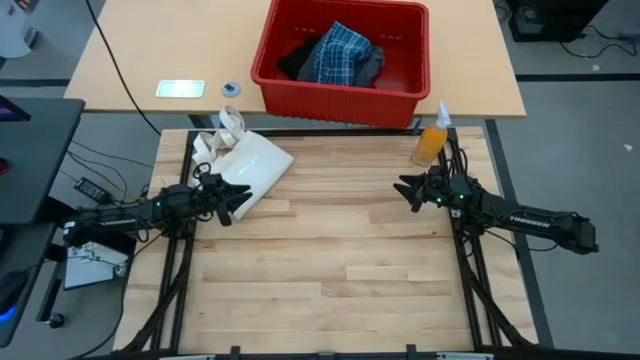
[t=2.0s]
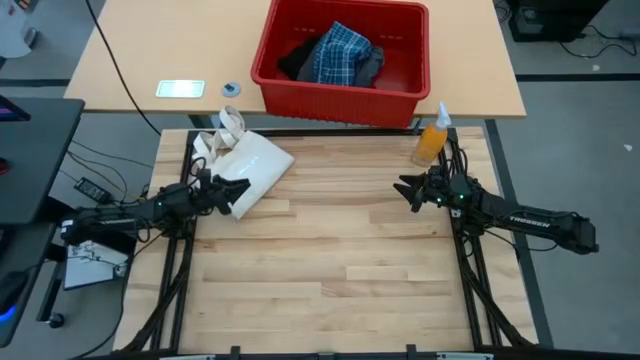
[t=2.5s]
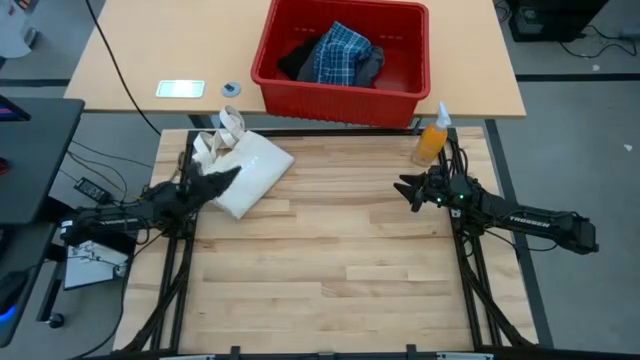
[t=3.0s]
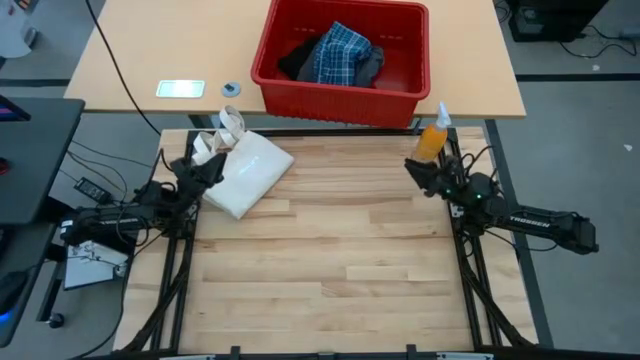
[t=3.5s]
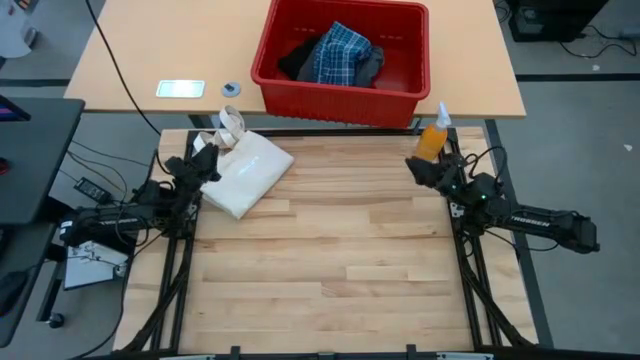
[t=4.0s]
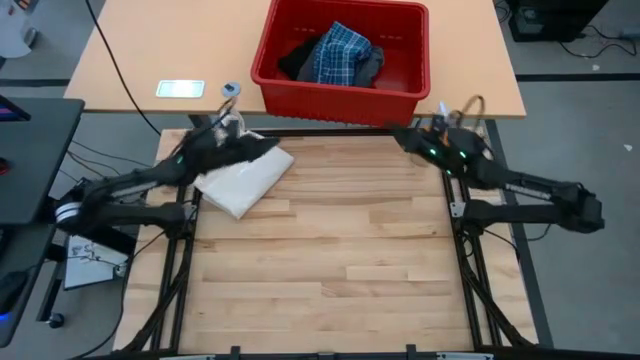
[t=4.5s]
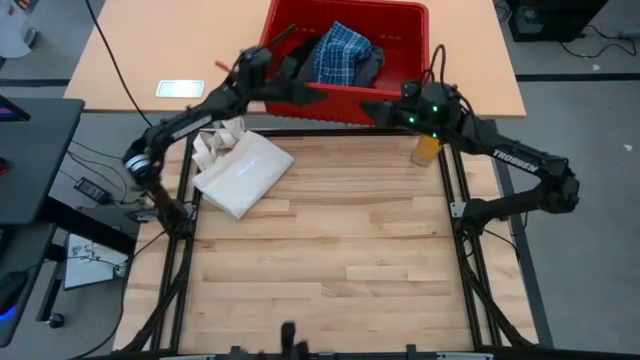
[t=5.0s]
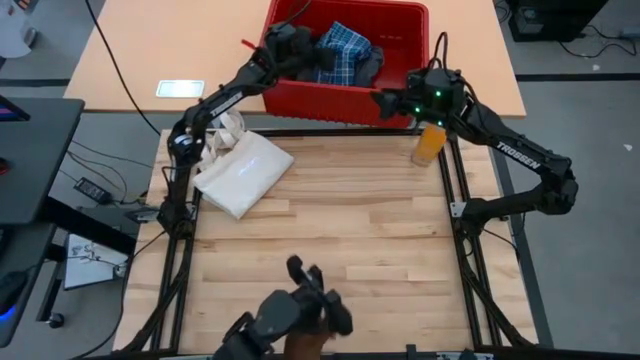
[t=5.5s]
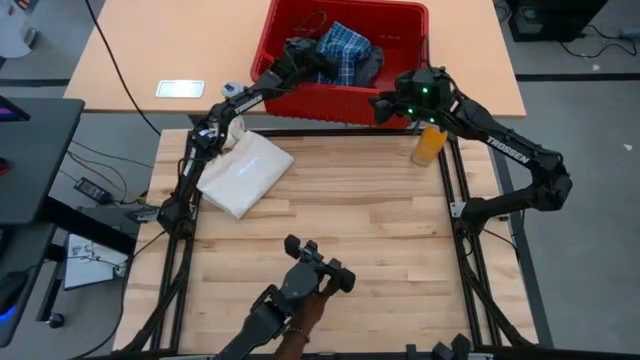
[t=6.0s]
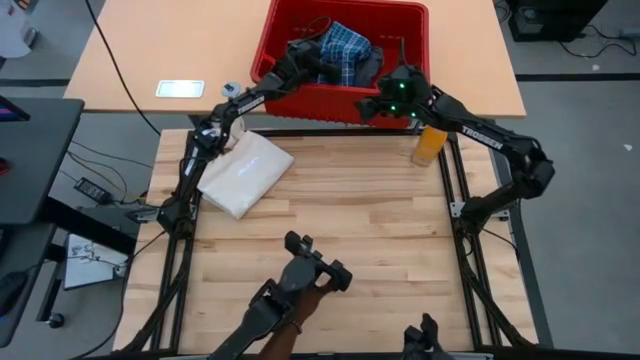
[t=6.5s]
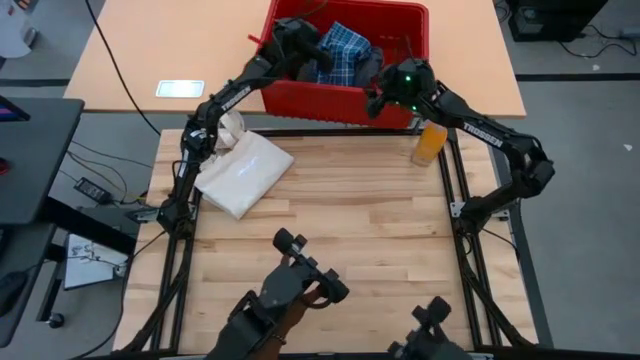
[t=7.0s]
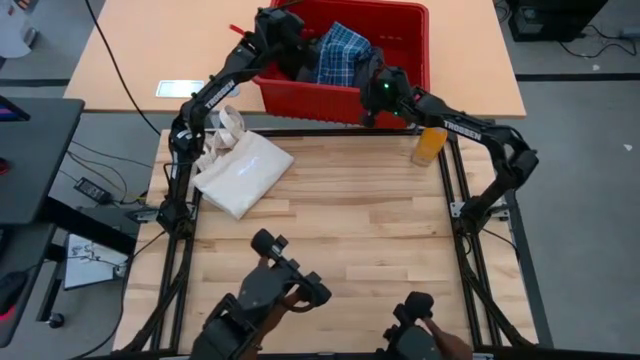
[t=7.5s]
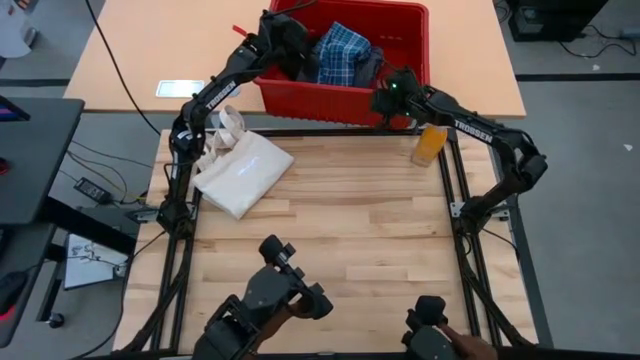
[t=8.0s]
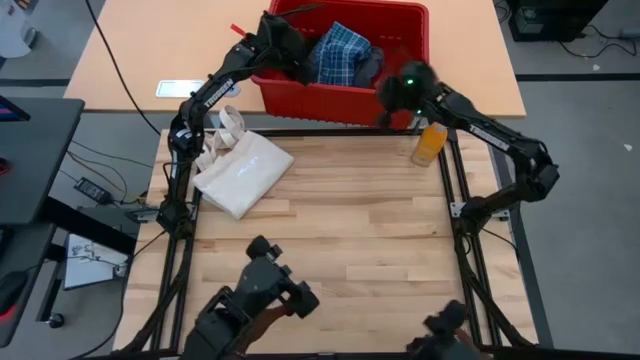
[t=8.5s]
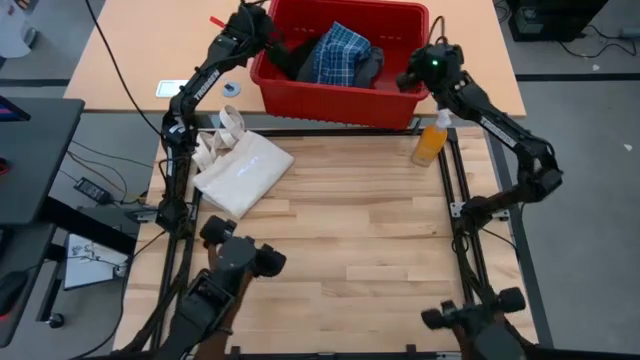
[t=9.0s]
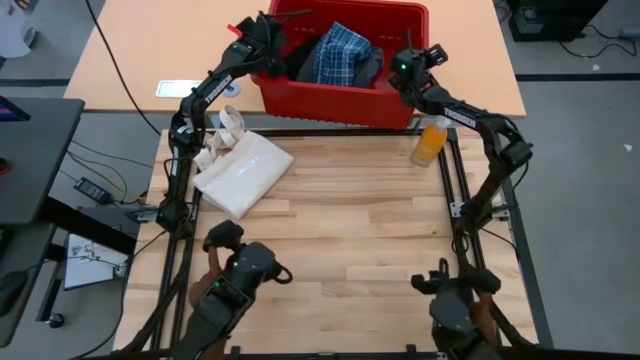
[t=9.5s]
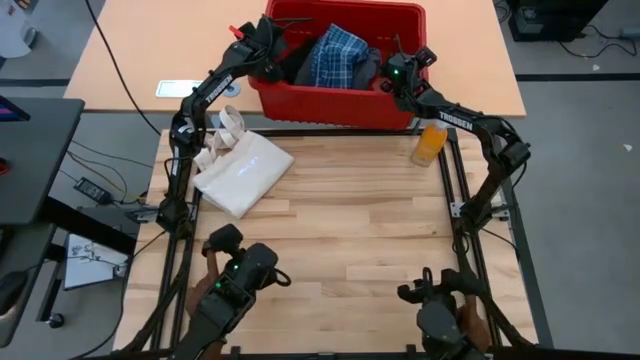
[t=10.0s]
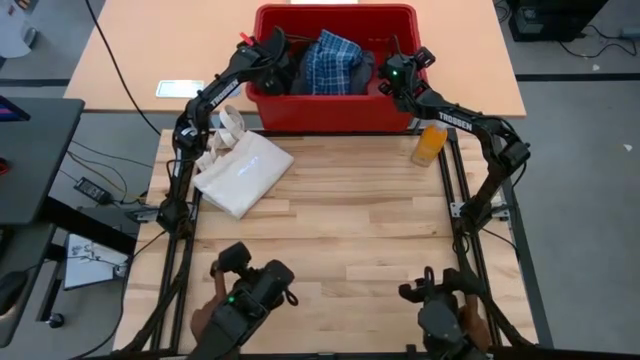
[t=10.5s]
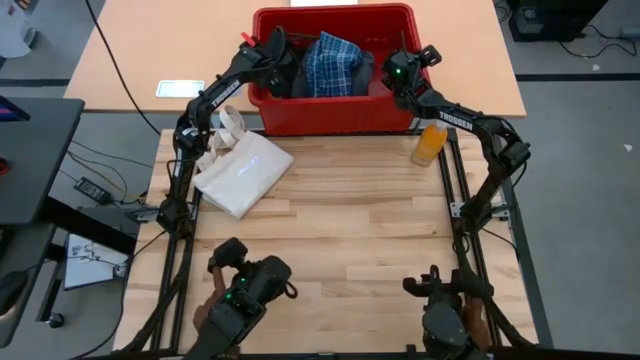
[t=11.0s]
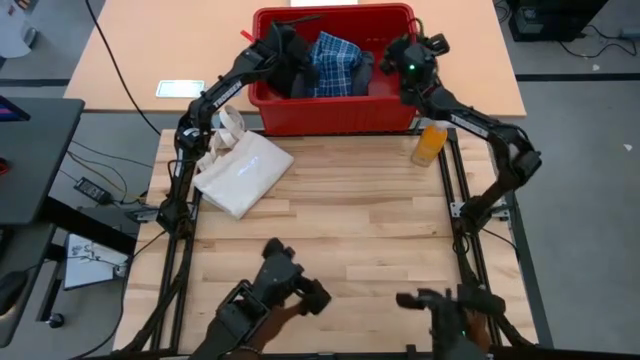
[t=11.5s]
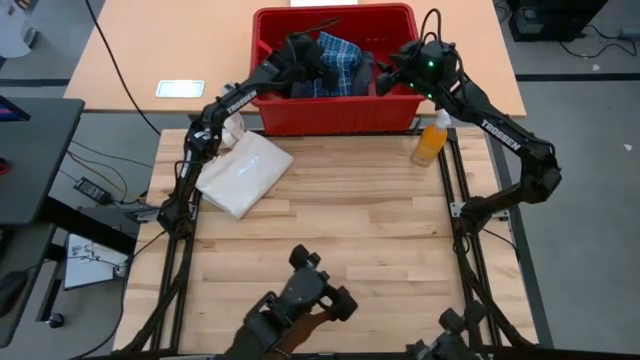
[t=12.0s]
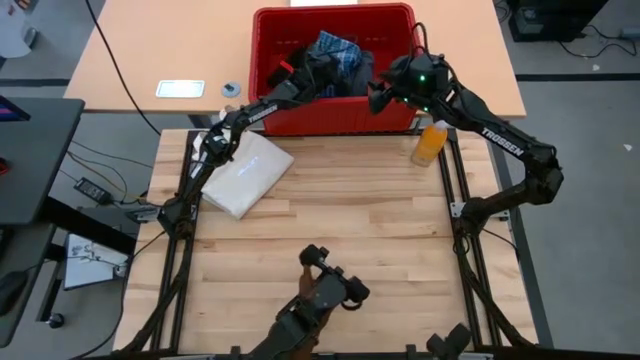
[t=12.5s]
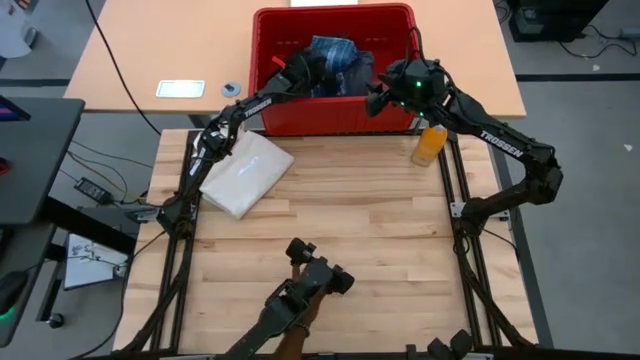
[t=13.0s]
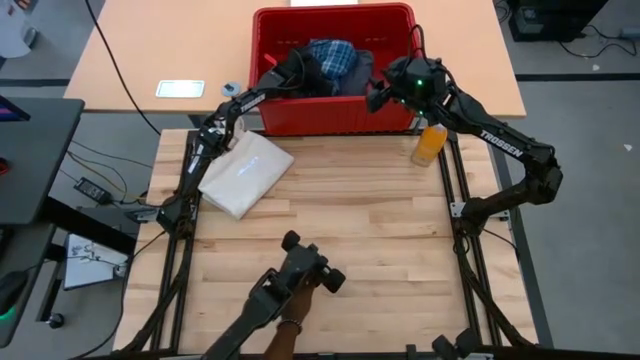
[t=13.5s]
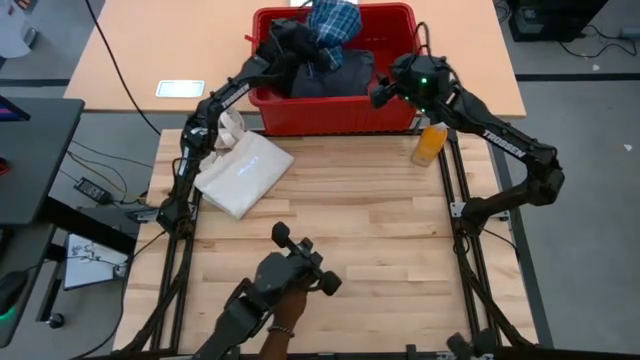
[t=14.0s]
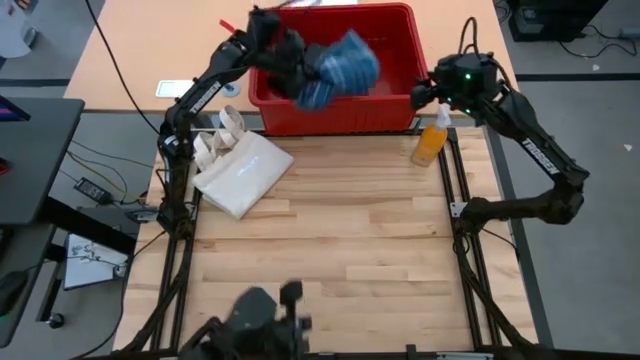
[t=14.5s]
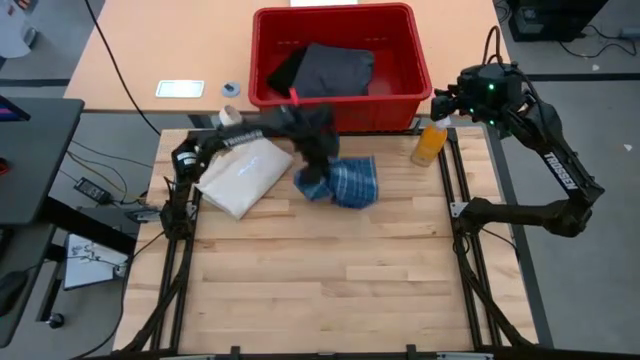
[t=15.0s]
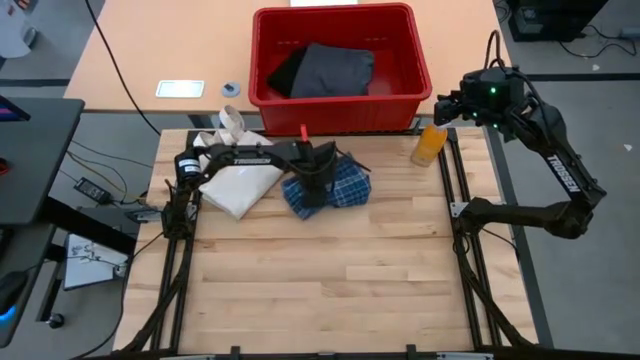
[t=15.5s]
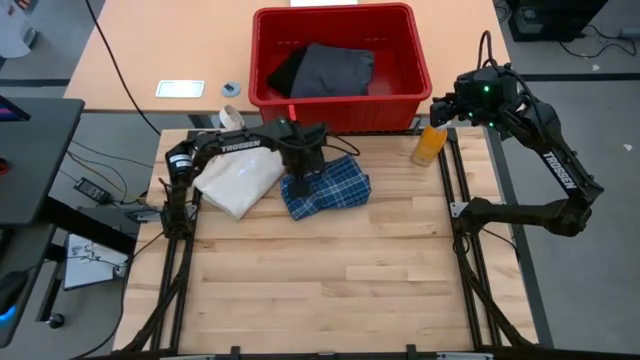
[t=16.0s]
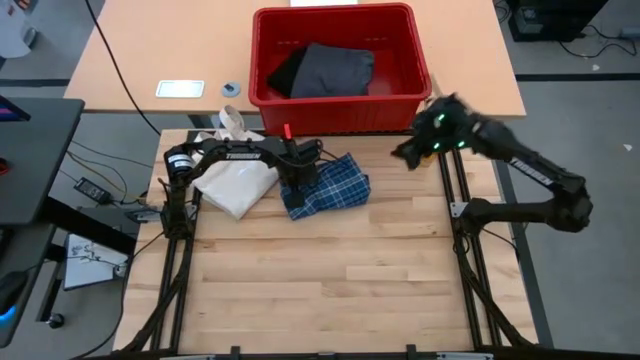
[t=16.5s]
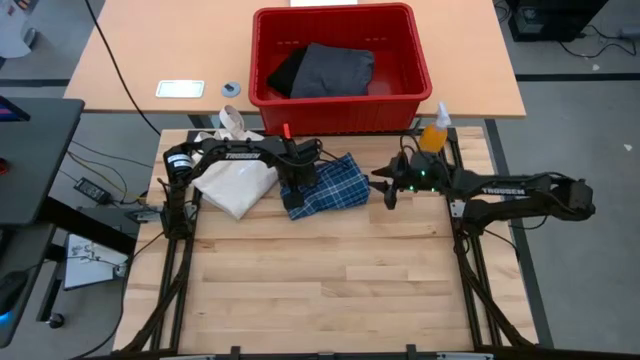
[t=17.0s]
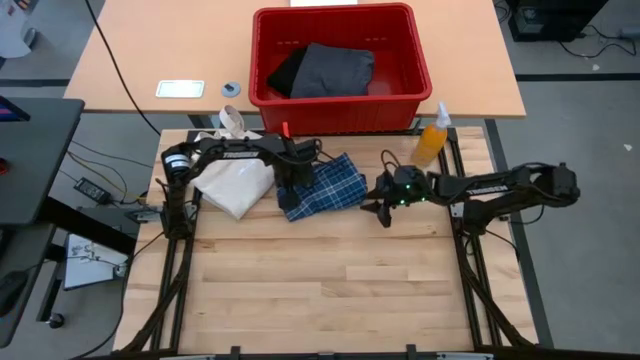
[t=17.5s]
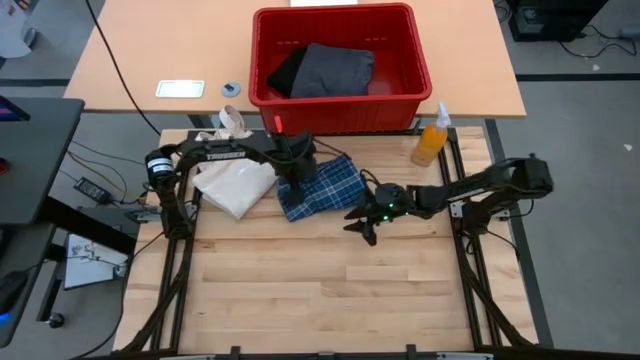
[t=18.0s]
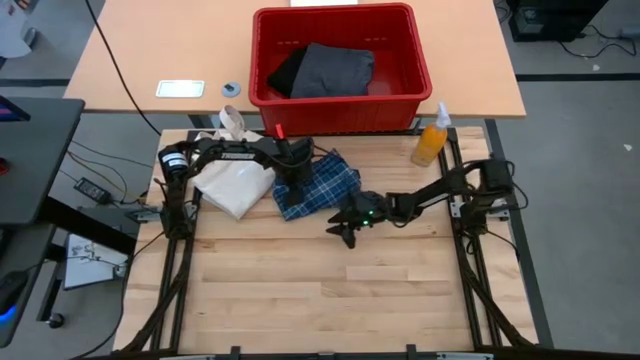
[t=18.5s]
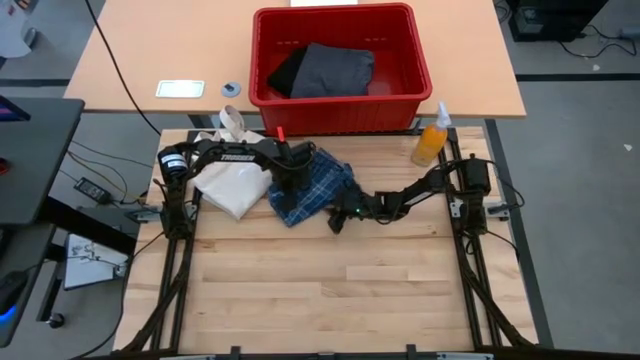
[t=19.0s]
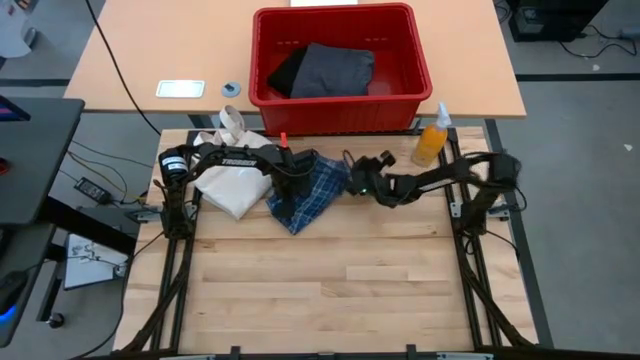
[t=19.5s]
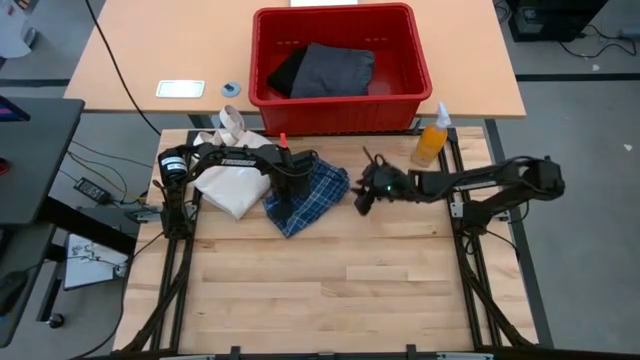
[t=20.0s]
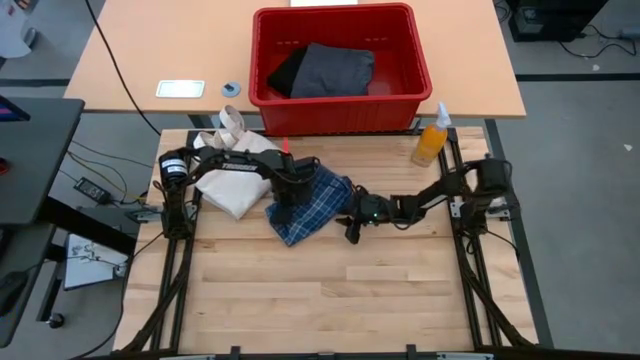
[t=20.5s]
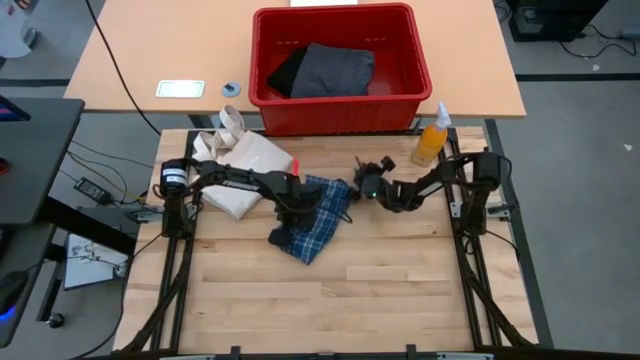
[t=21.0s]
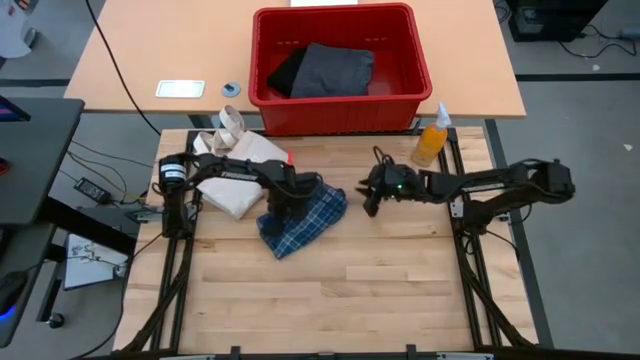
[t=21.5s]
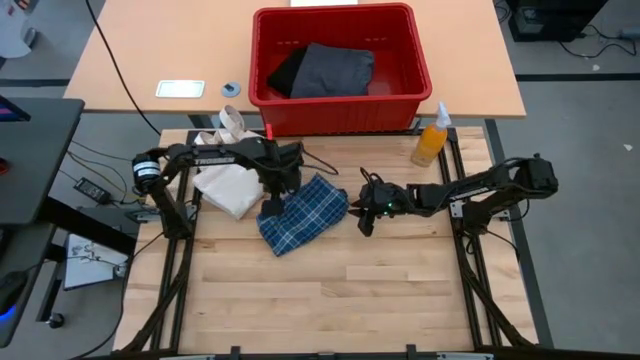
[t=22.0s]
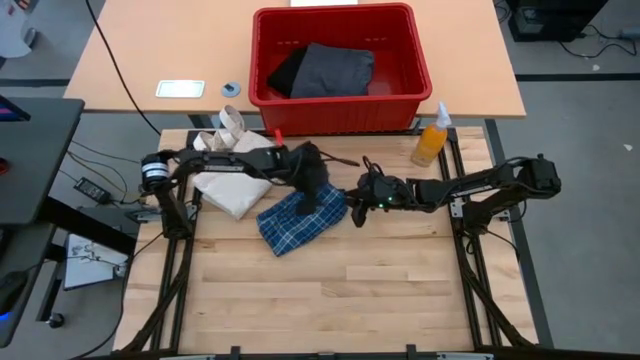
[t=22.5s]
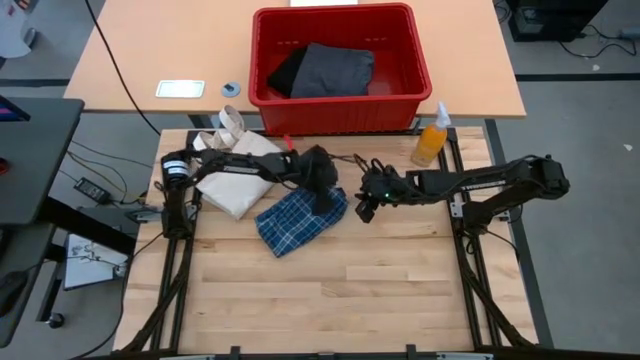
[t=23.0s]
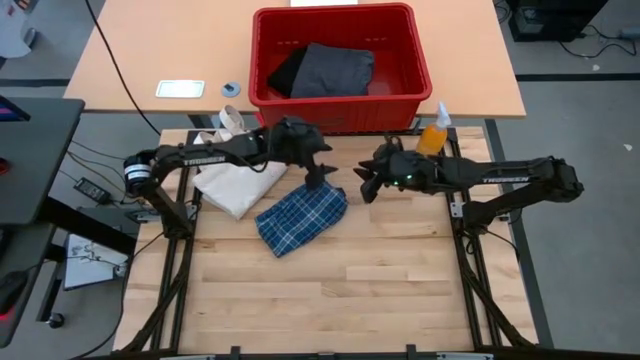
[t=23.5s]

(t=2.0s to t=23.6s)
Task: Fold Laundry from Bin
Remove the blue shorts from the red organizer bin
